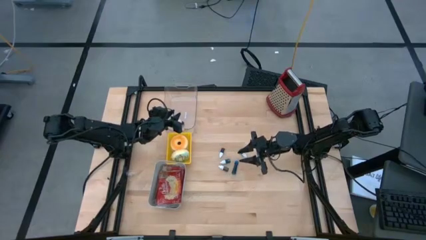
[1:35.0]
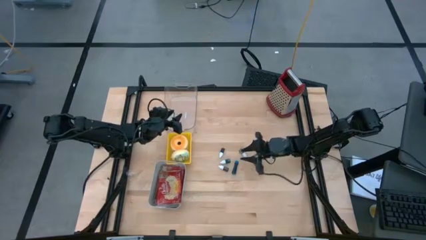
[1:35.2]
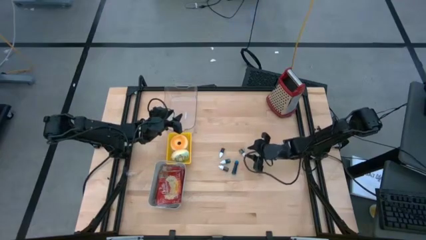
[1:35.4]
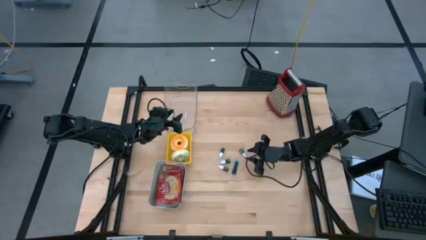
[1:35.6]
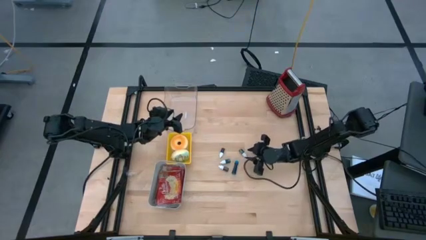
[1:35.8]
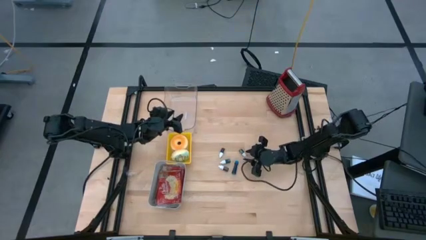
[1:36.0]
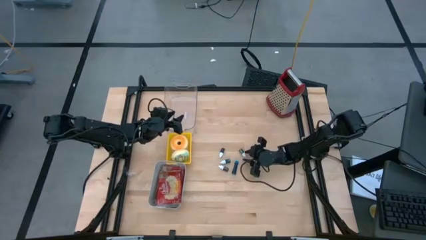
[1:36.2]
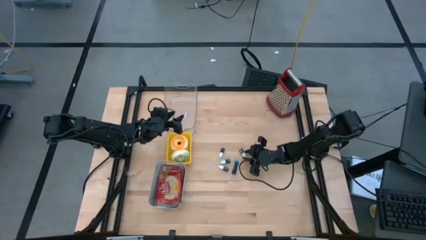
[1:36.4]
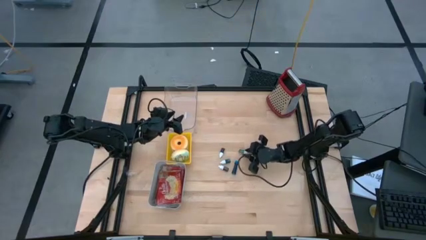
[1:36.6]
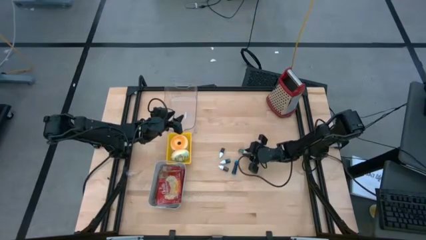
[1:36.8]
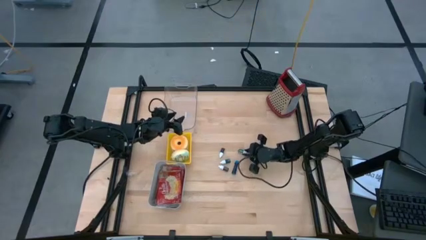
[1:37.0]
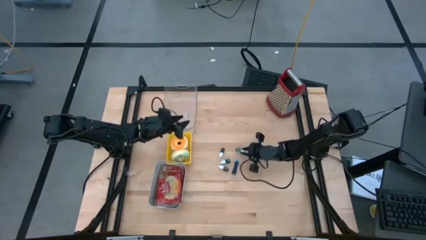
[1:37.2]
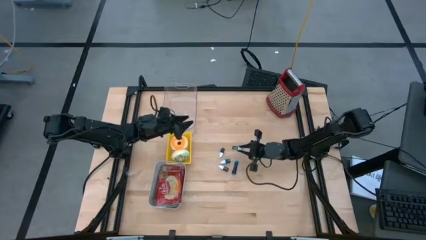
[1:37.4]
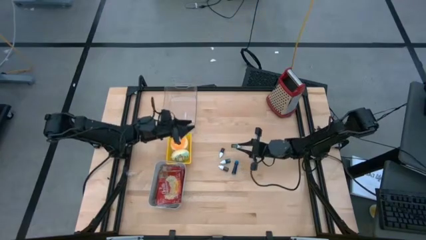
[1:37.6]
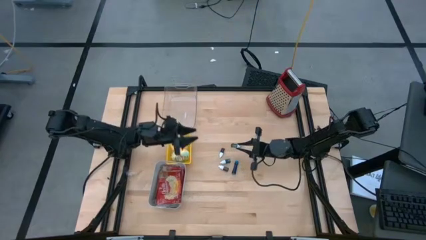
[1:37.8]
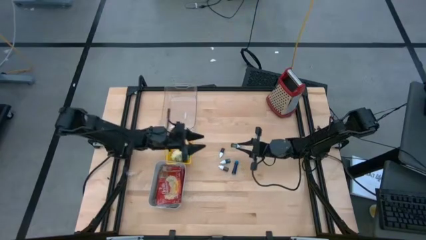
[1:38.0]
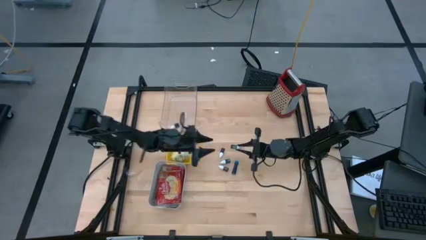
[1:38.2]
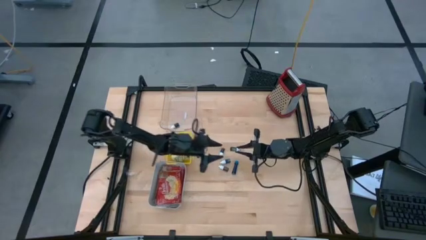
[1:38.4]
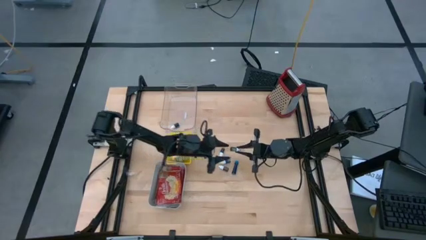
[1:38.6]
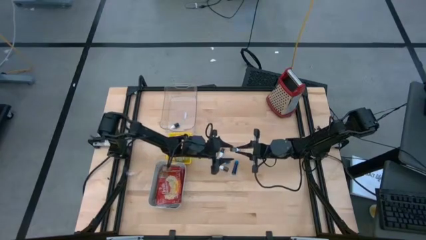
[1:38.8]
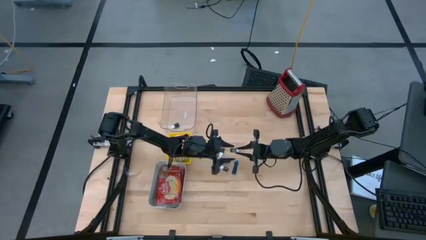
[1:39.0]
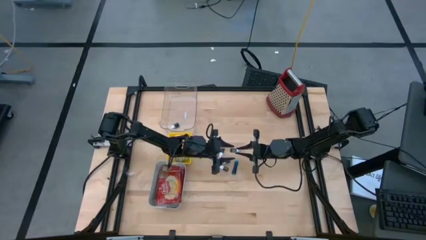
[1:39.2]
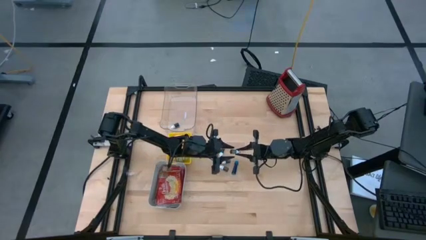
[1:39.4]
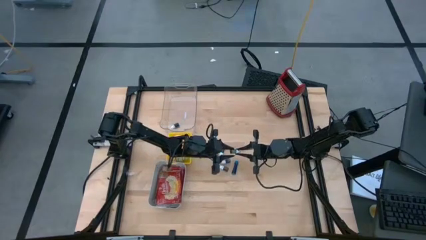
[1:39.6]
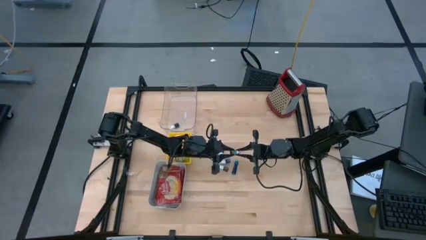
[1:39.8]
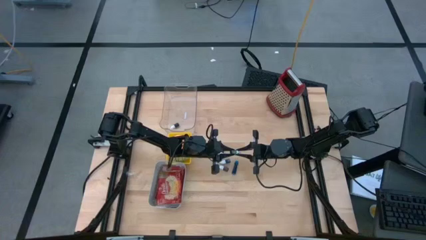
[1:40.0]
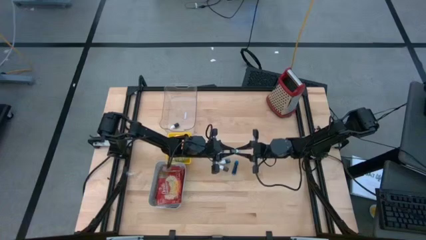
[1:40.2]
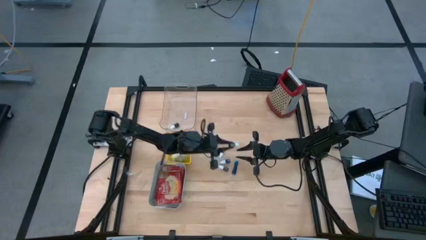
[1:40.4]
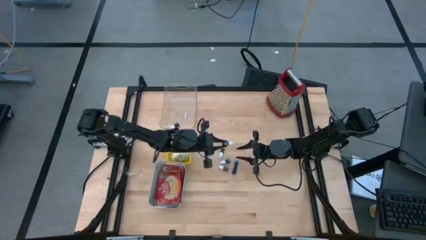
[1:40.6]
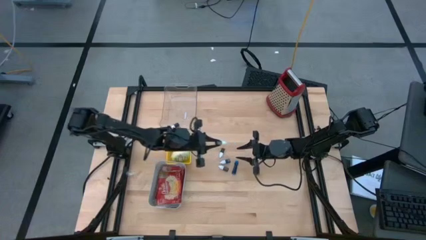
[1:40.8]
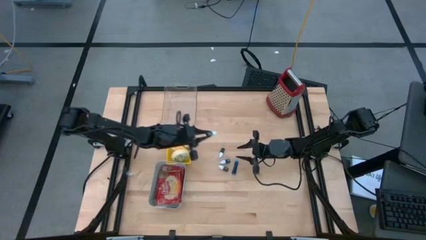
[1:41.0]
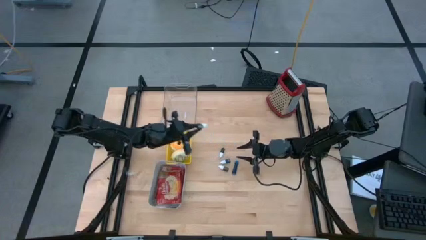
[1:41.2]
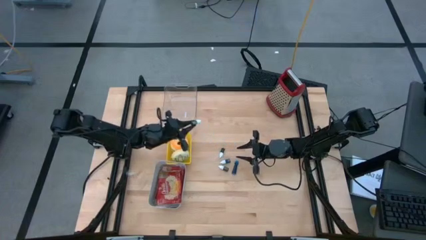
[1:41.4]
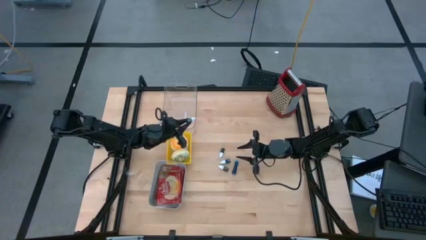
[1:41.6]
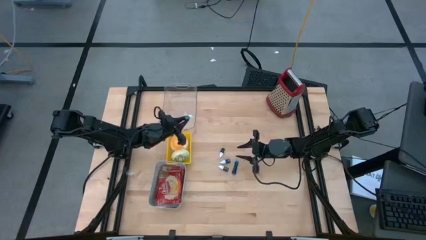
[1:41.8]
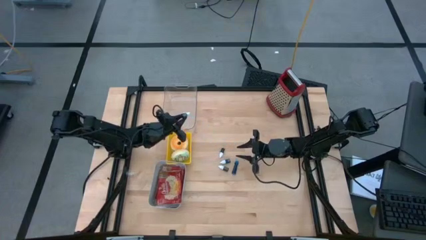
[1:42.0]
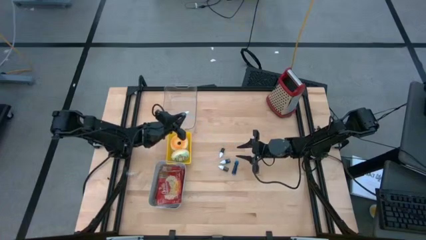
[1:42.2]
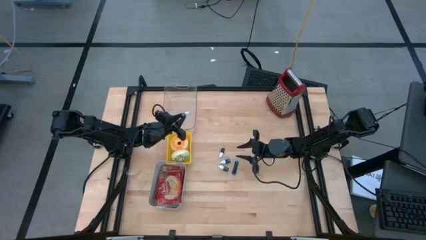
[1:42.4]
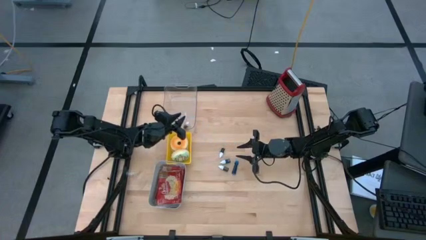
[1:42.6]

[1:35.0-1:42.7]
Task: Pick & Place Food Item
Put the right green food coloring bottle into the transparent bin

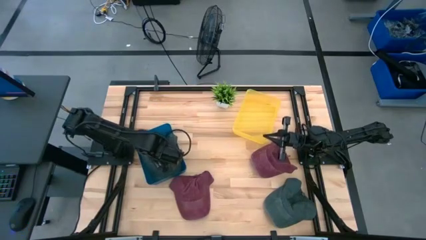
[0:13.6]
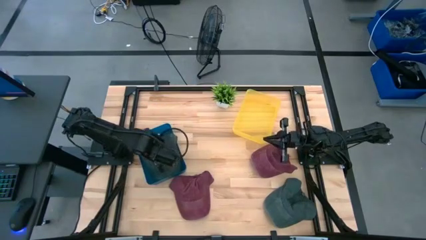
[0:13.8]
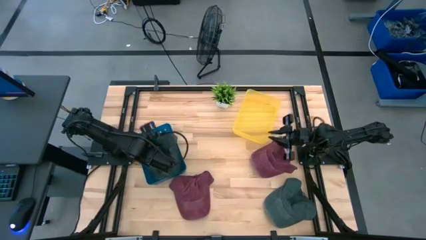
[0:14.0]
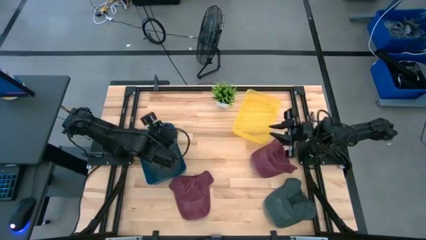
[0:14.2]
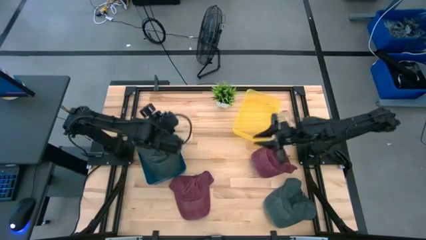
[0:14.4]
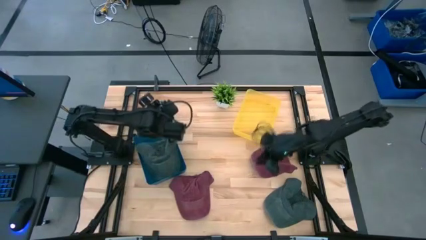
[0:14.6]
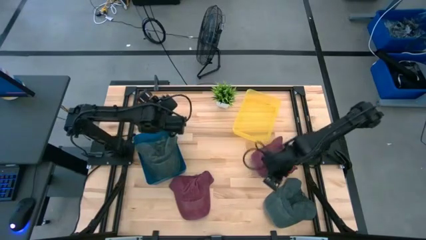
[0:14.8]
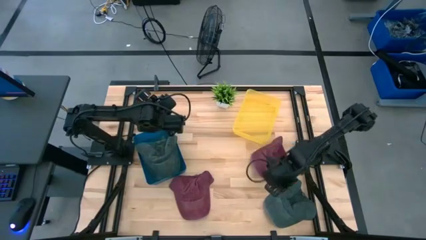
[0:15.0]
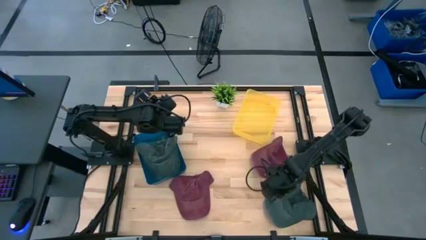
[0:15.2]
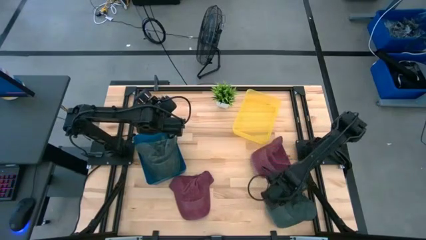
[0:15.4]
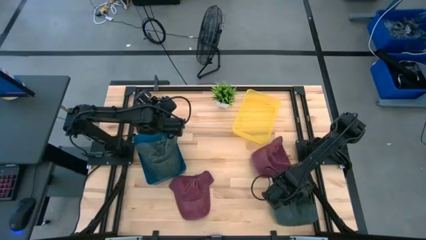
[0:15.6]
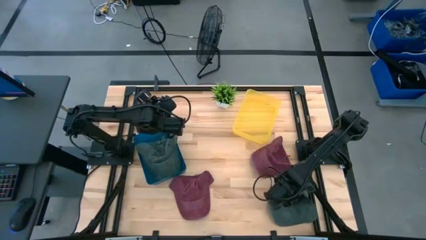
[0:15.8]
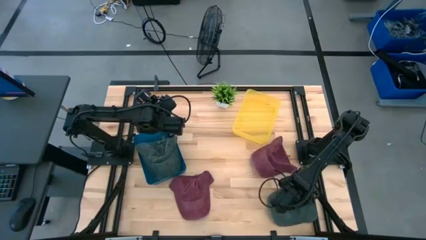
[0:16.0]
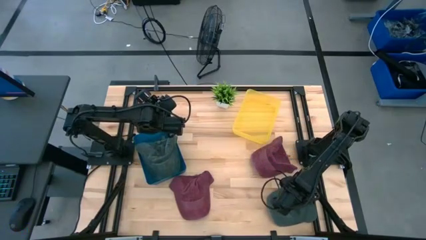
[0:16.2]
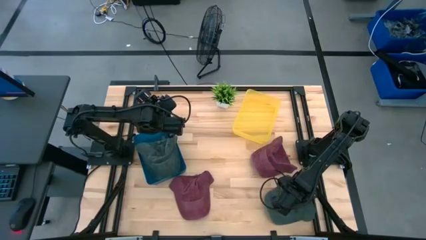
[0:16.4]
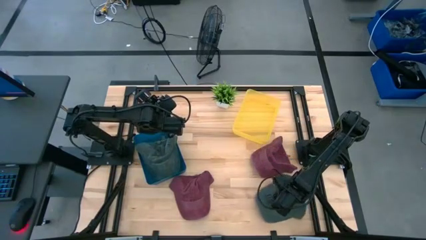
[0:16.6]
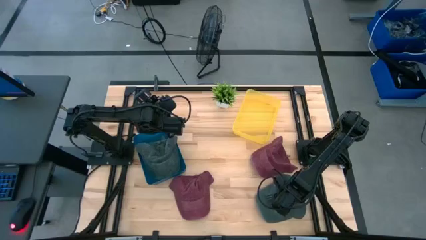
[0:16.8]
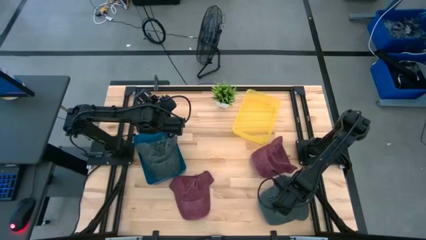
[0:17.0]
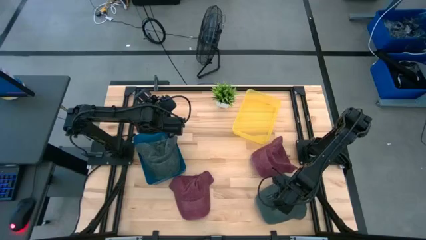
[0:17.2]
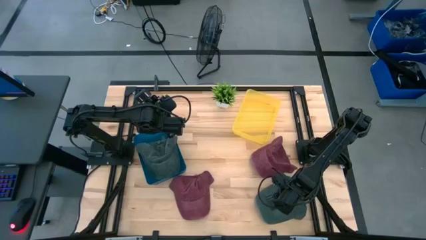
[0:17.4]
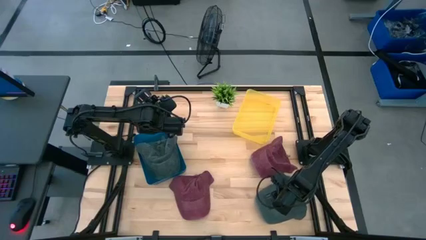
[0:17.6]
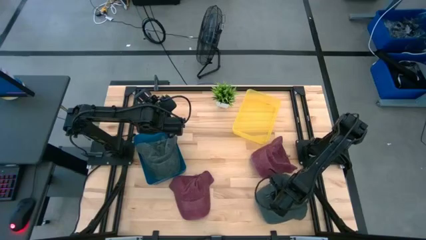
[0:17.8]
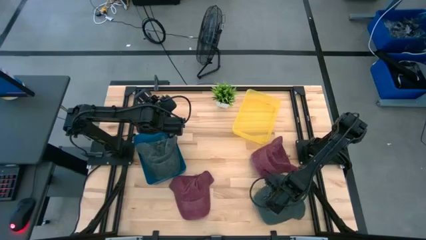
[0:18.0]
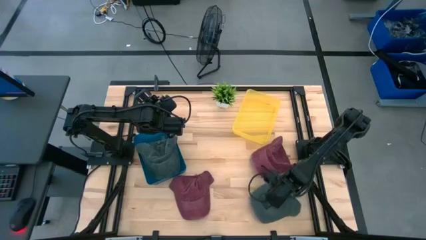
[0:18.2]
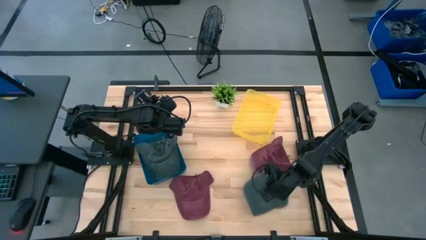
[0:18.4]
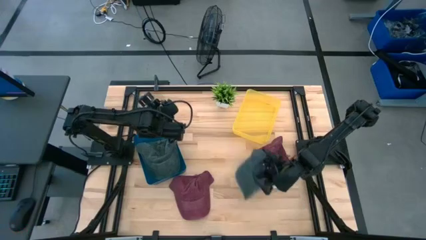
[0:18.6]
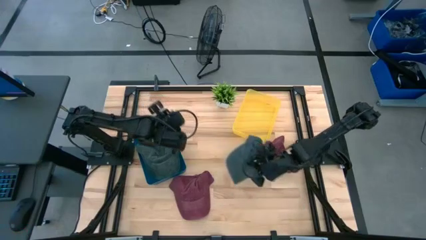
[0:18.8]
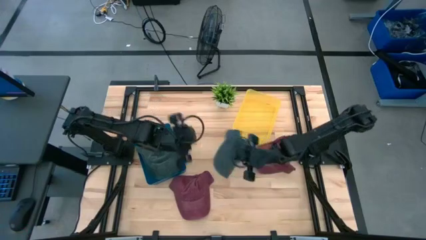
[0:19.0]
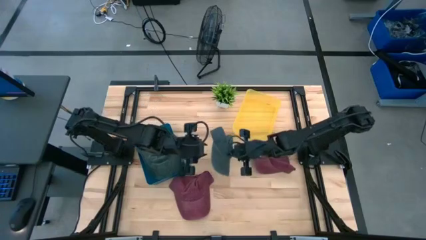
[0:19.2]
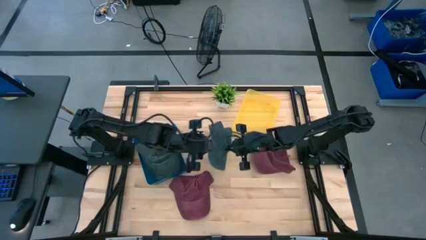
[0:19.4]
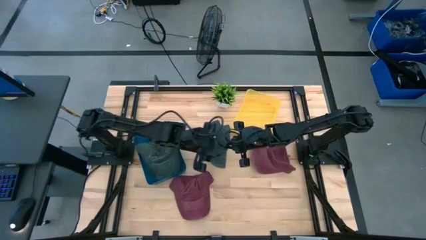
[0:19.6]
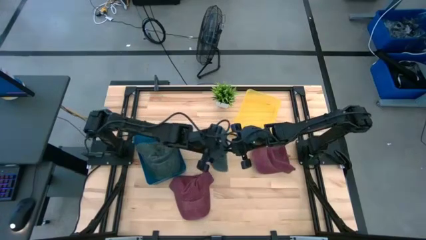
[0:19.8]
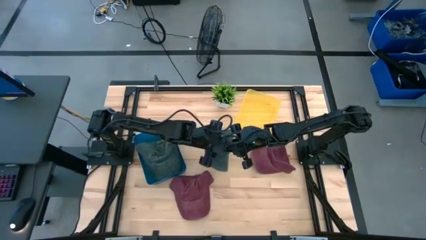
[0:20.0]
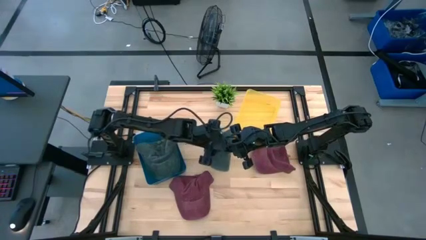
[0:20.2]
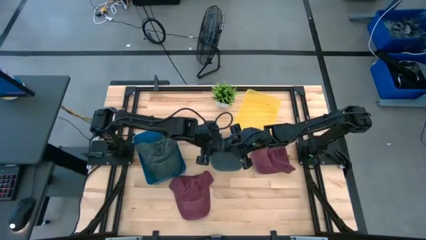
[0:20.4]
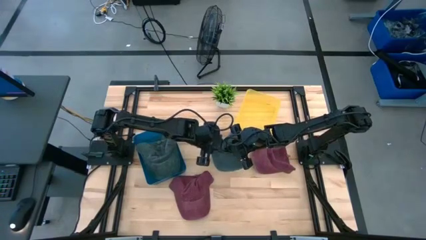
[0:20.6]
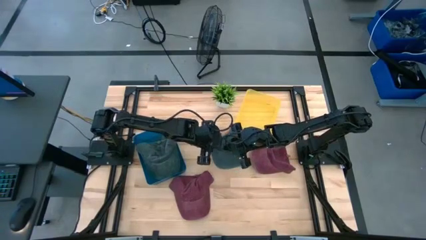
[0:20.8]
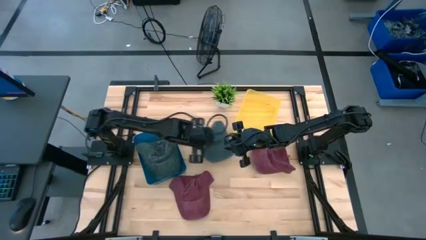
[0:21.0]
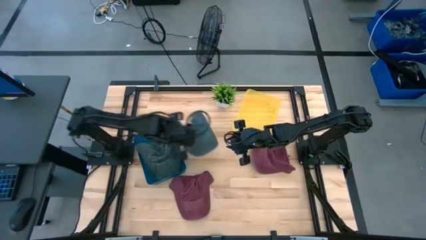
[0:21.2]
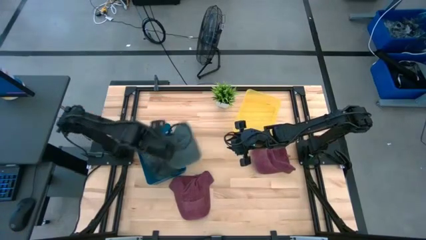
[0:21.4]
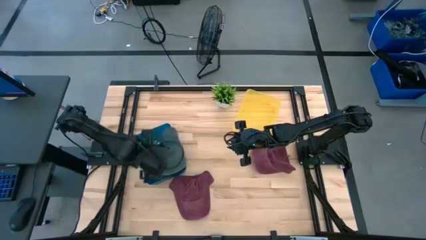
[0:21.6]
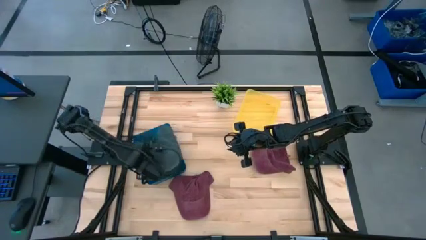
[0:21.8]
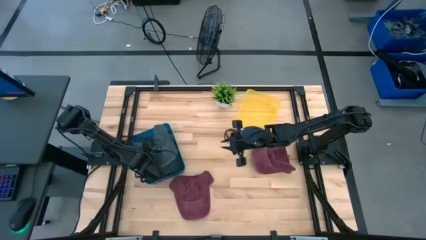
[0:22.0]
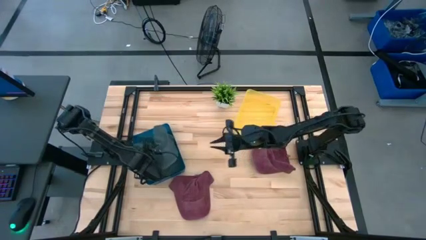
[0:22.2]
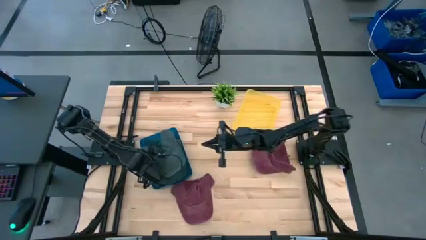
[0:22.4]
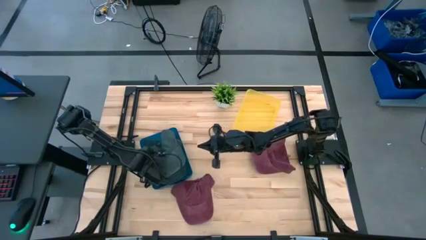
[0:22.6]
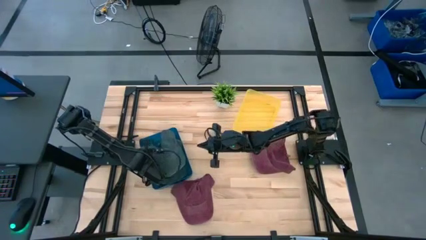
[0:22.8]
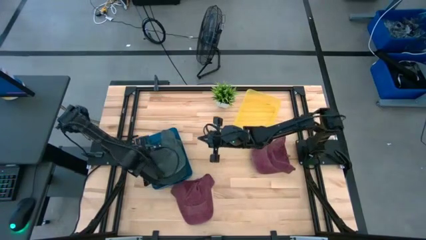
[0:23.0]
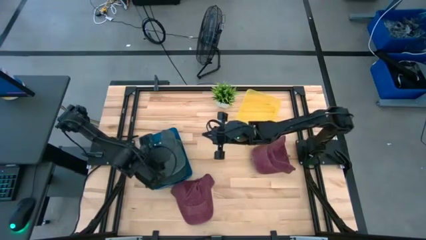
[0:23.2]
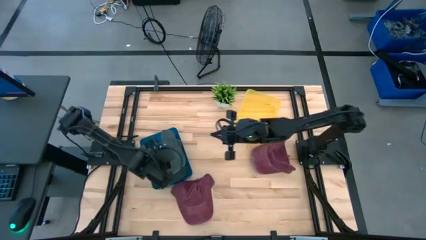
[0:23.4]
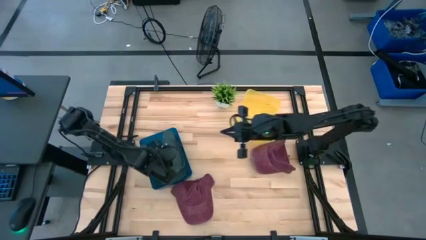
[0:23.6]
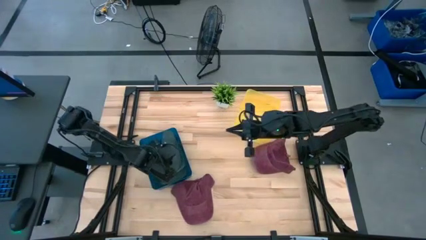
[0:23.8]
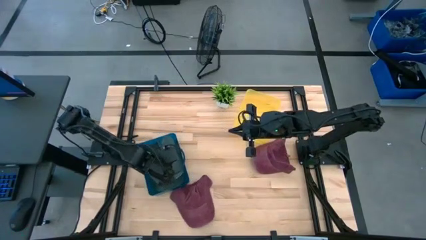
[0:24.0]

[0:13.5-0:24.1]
Task: Pick & Place hat
Put the gray cap into the blue bin
